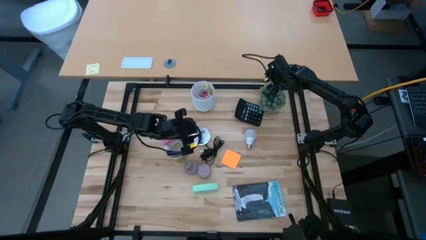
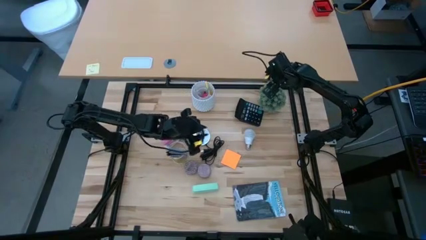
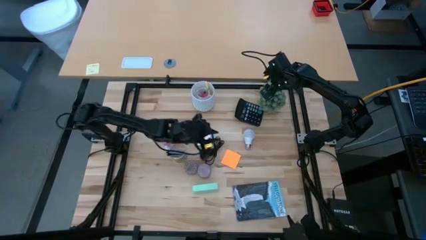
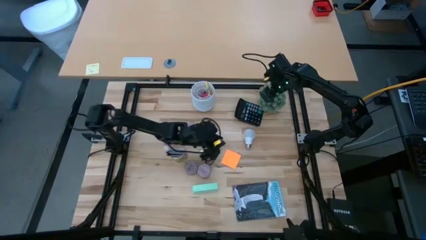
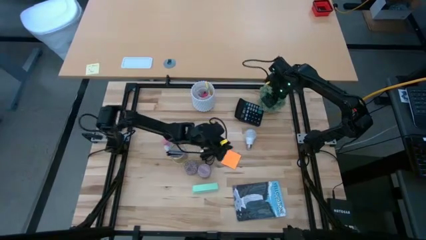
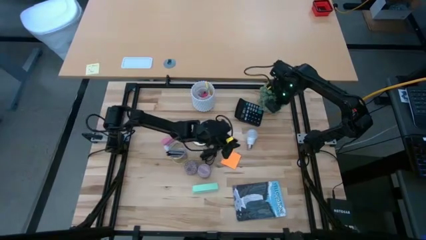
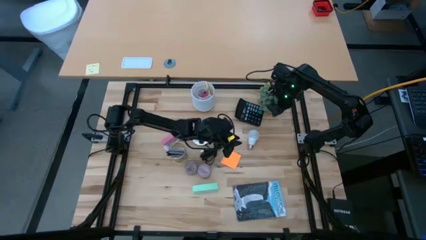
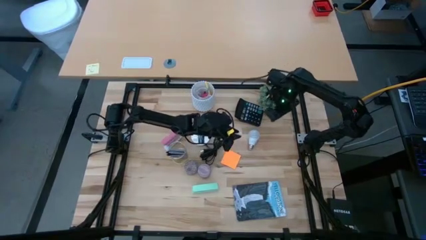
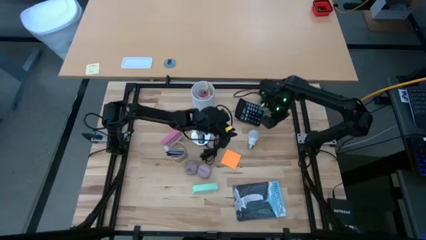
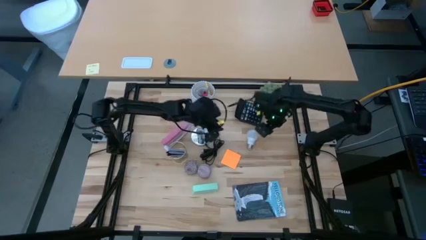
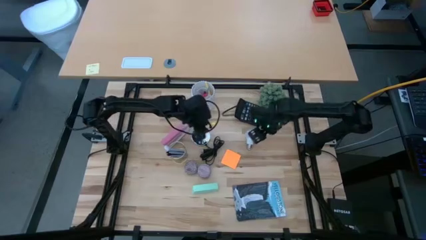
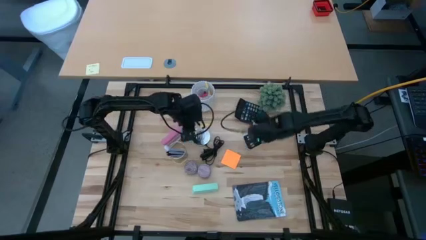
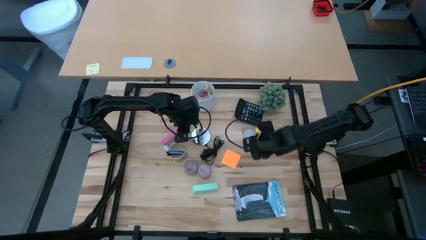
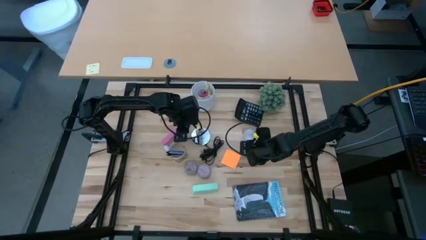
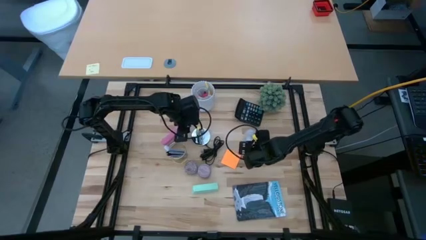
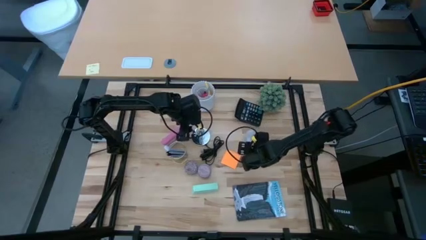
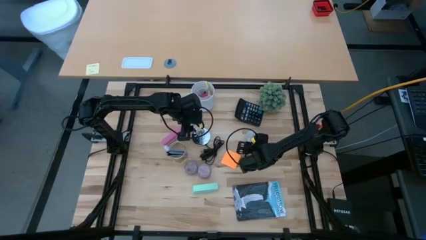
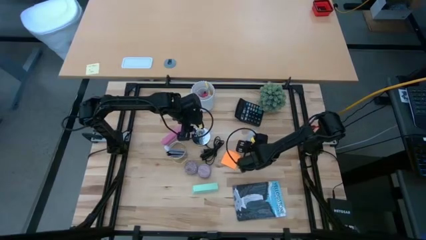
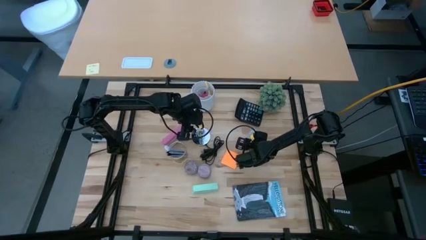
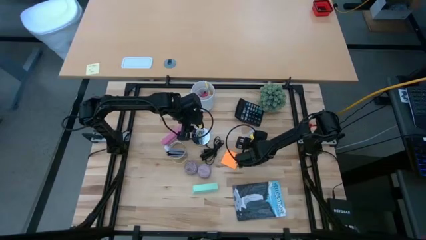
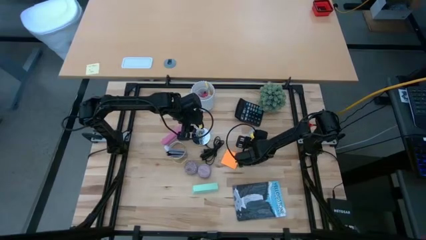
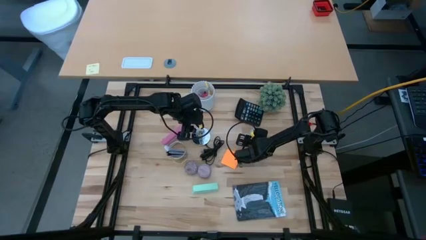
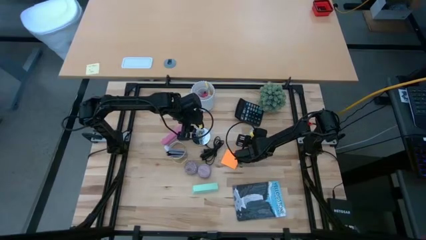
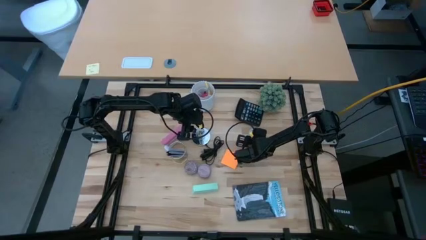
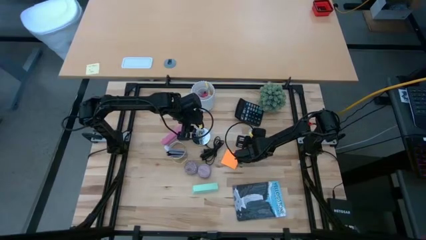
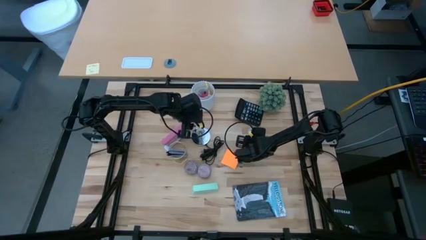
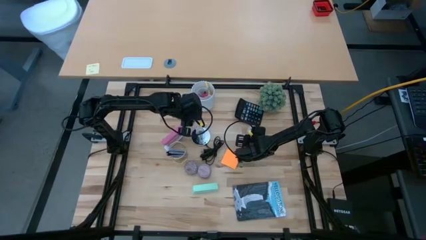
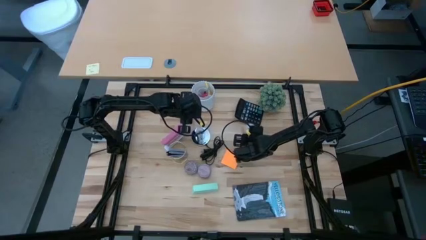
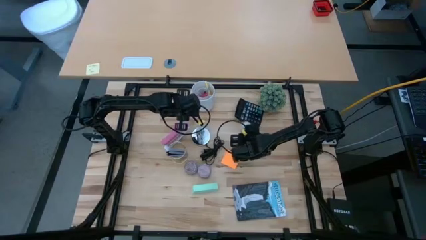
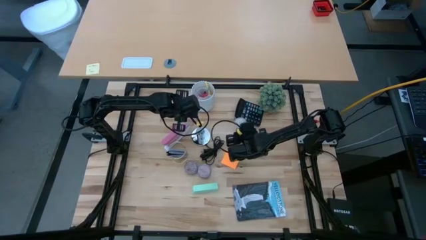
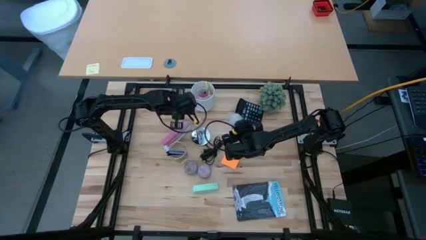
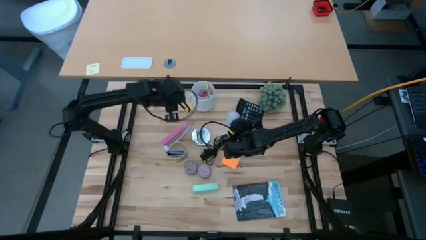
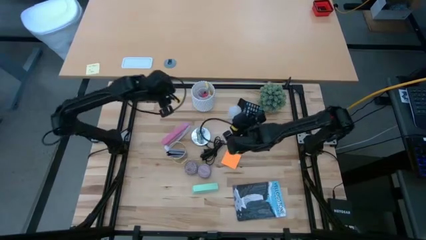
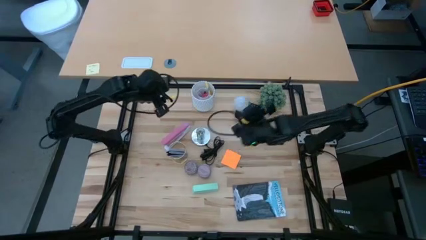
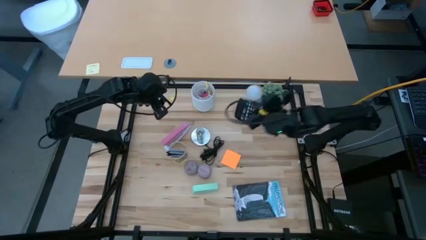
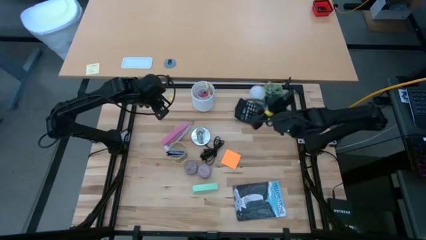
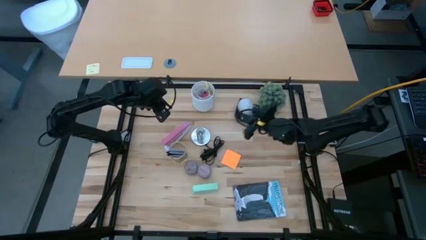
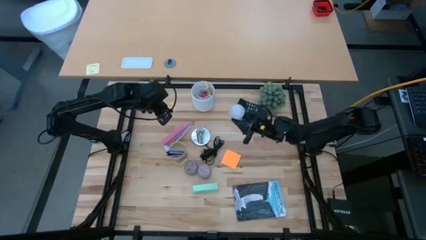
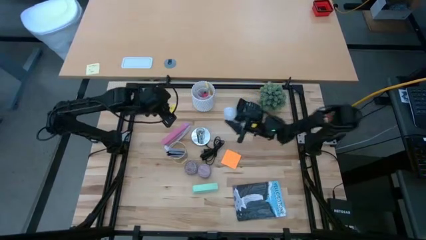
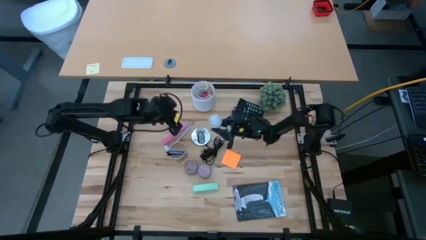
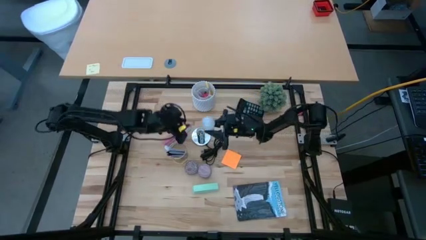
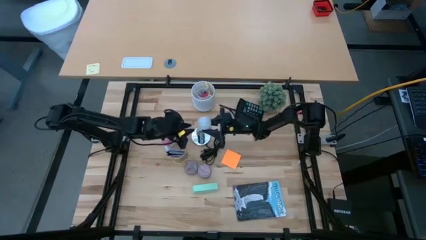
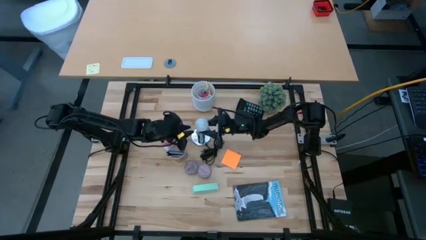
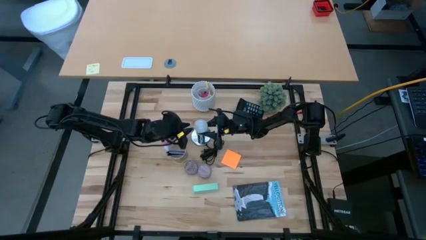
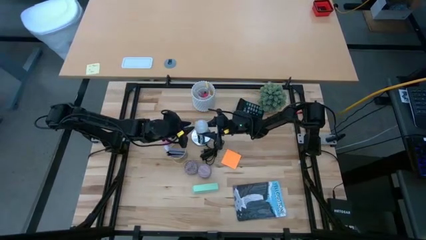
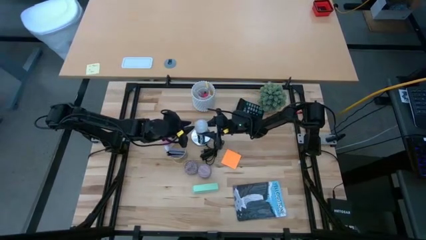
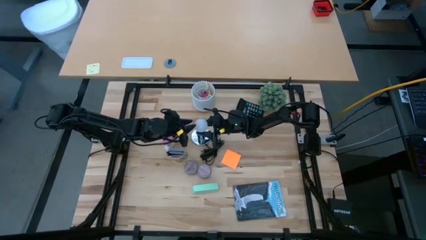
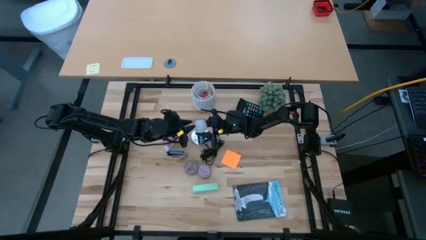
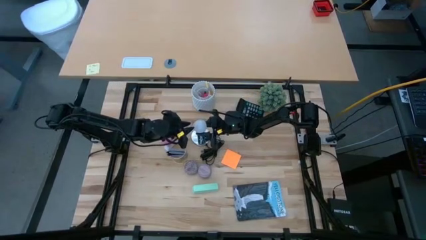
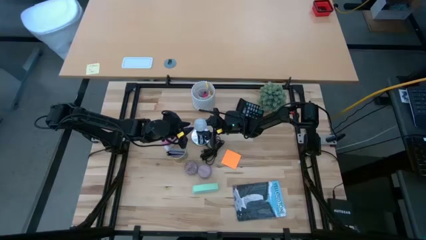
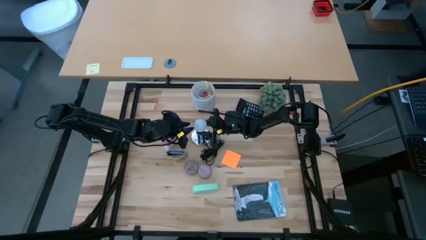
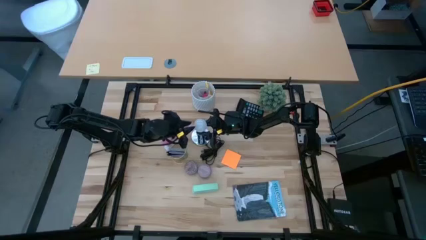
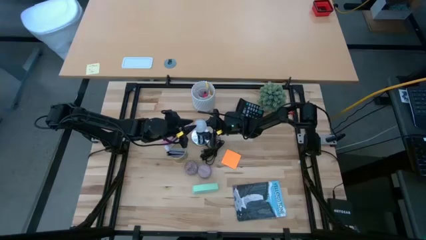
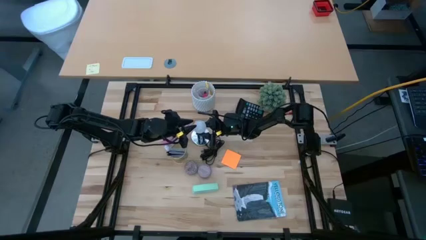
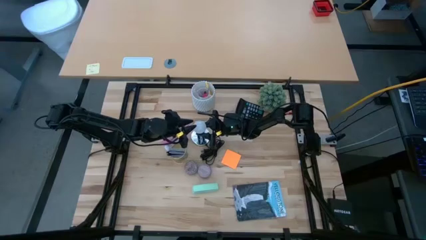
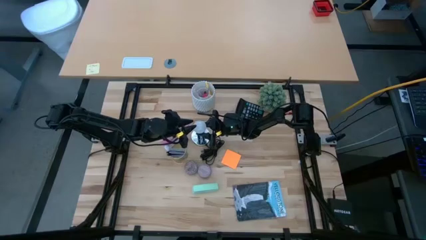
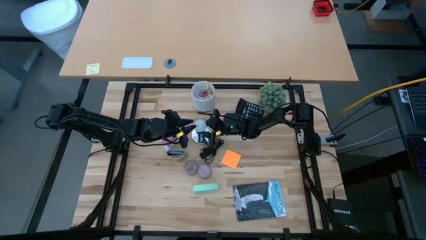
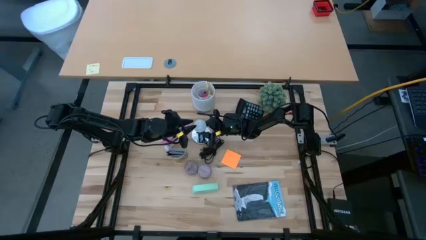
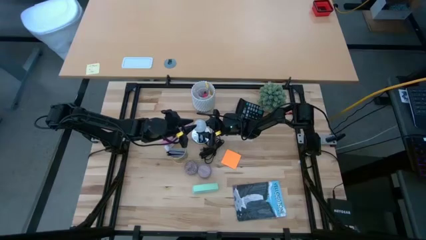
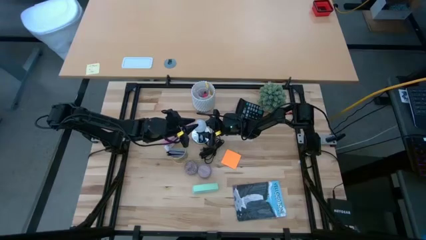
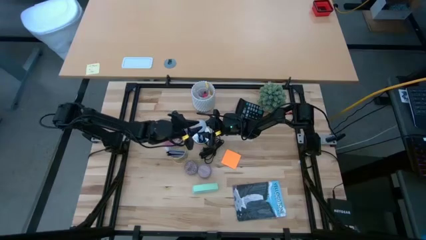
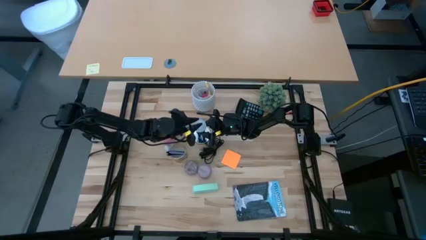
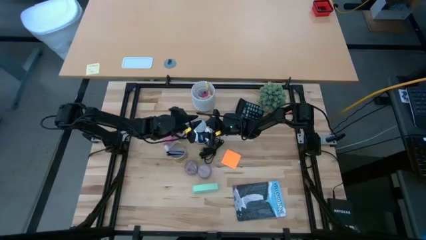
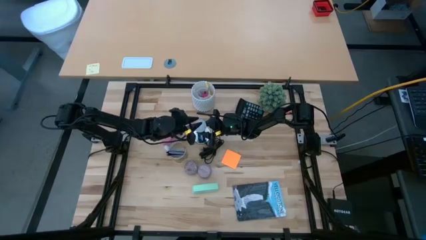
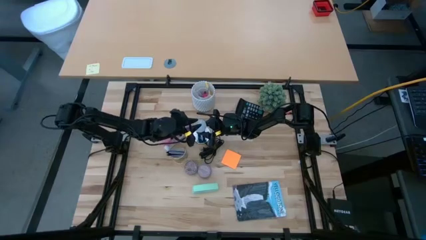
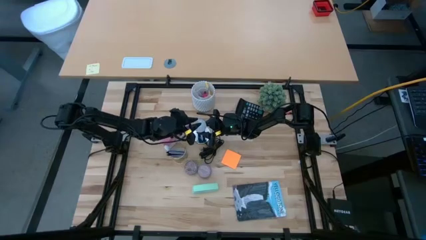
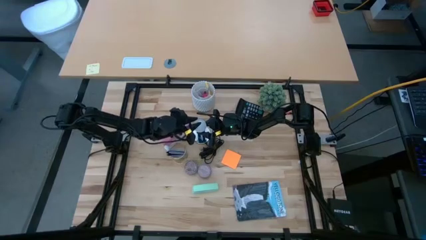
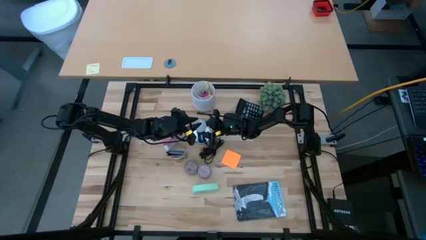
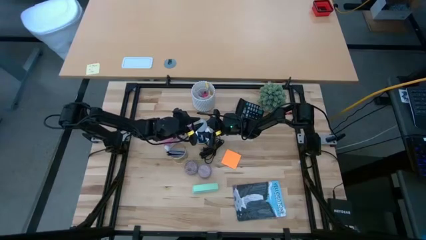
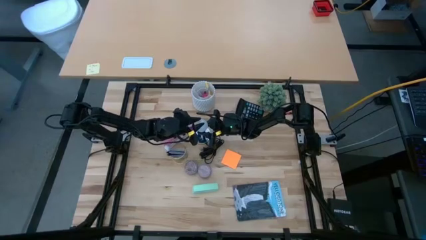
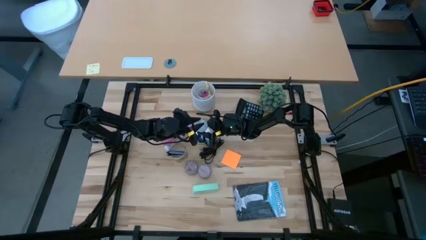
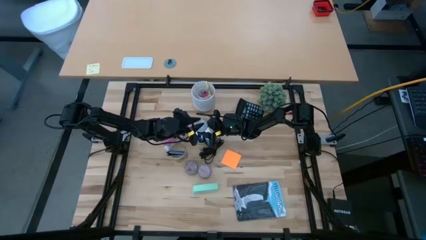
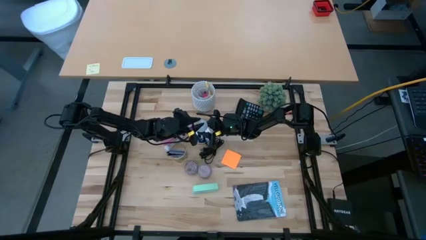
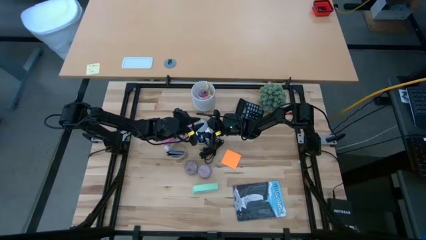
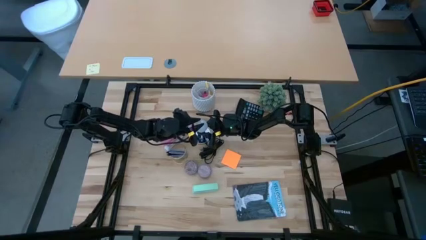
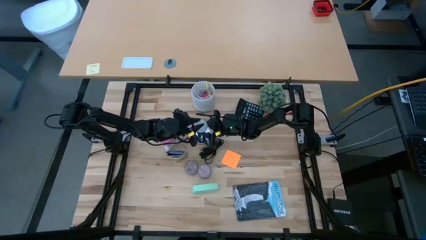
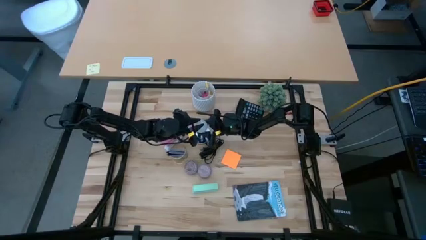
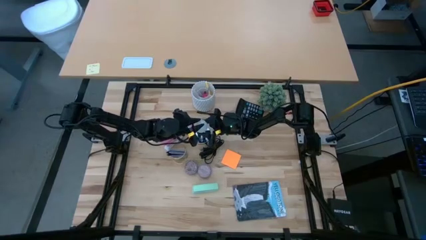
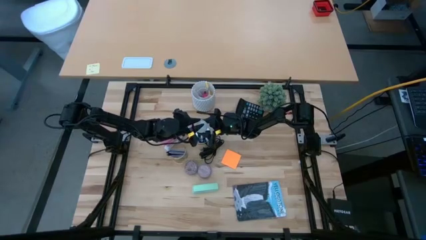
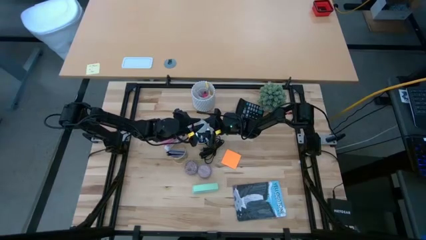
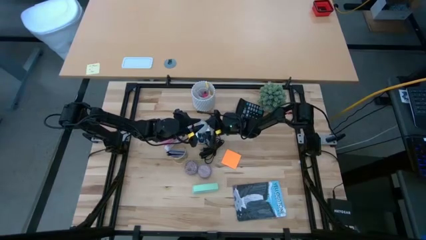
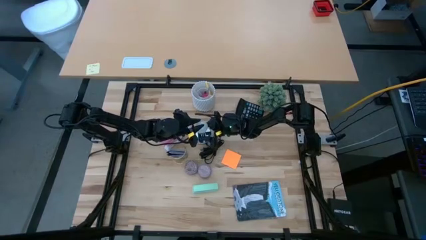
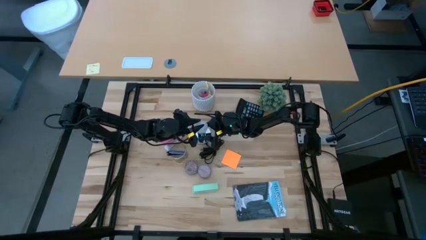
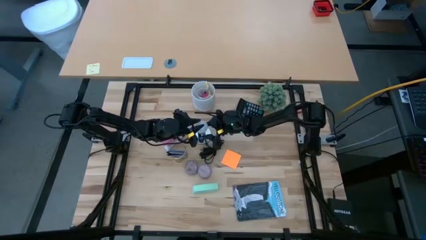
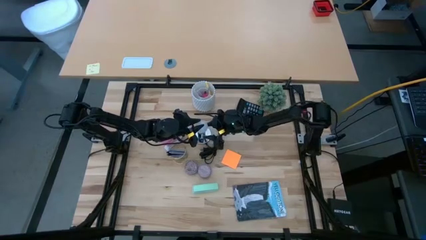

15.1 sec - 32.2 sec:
Task: Screw lightbulb
Insert the white lightbulb into the silver lamp
